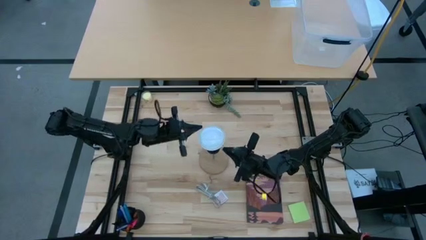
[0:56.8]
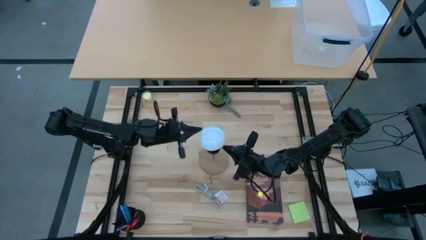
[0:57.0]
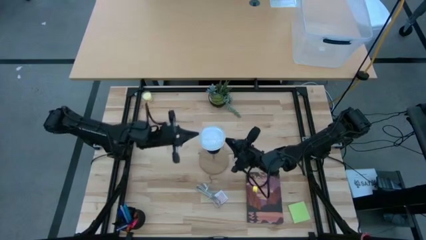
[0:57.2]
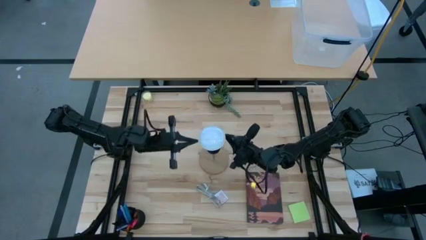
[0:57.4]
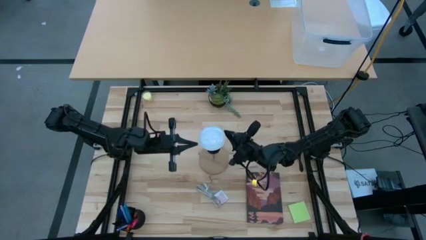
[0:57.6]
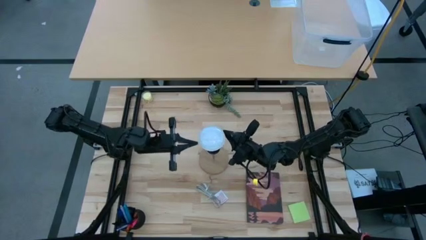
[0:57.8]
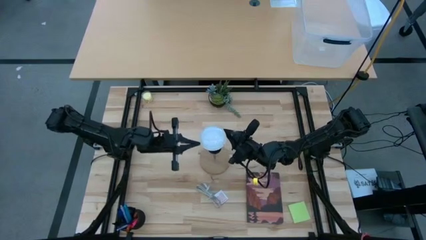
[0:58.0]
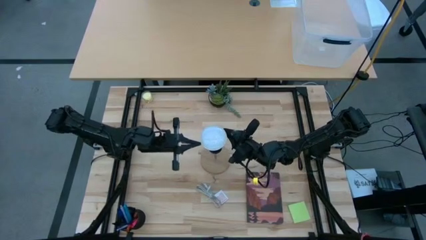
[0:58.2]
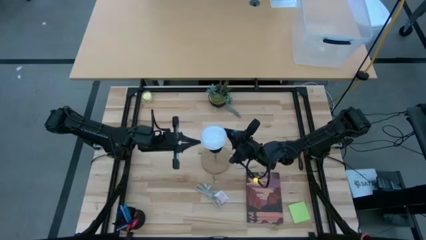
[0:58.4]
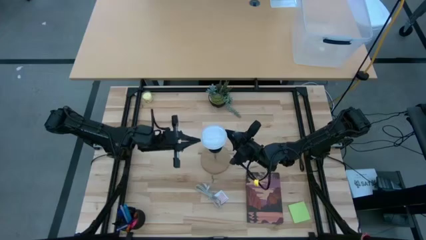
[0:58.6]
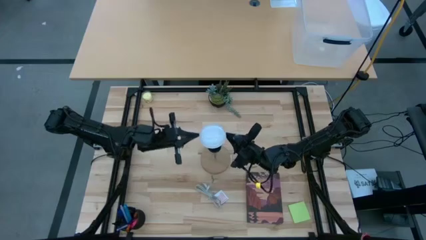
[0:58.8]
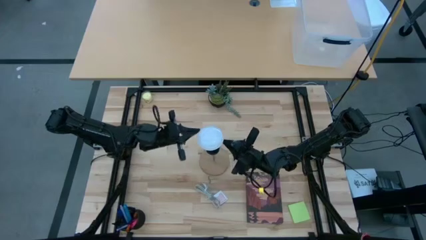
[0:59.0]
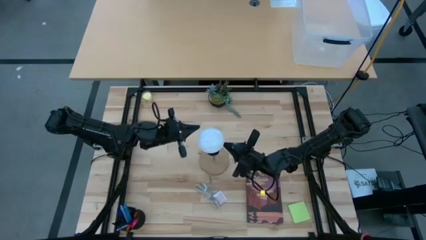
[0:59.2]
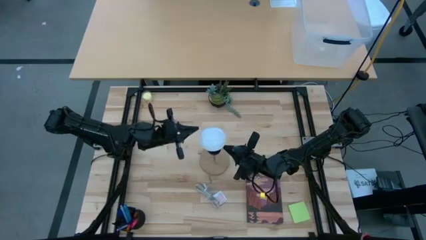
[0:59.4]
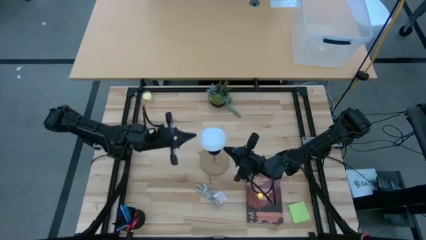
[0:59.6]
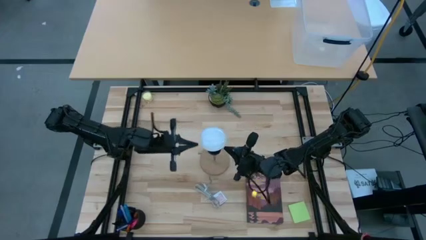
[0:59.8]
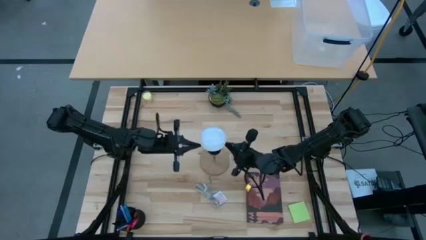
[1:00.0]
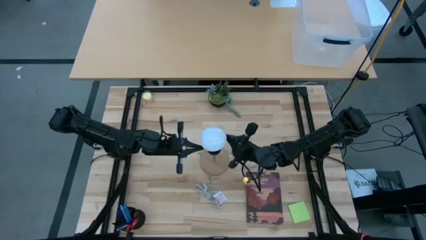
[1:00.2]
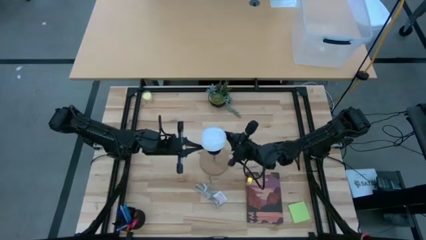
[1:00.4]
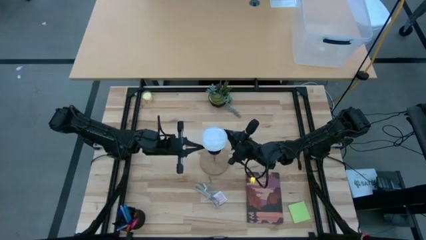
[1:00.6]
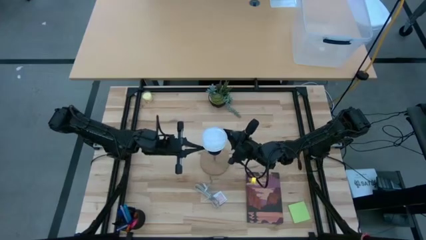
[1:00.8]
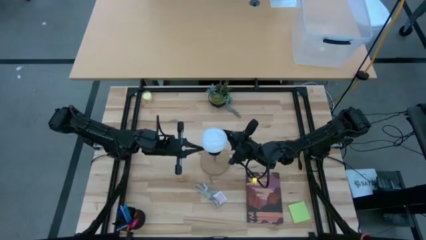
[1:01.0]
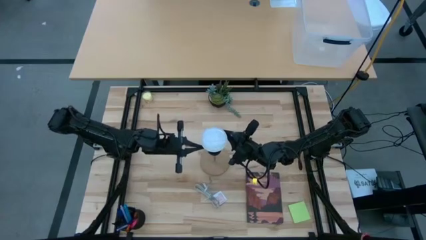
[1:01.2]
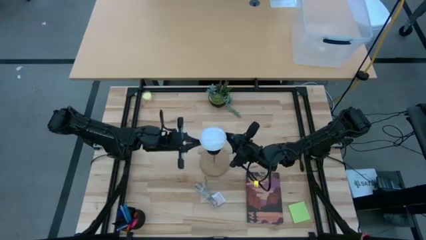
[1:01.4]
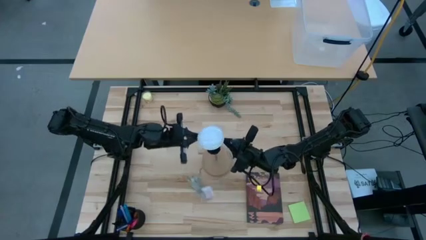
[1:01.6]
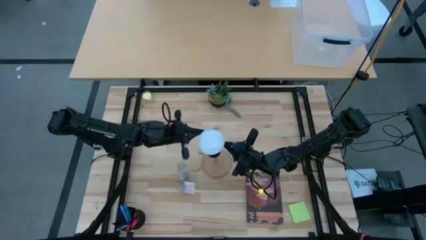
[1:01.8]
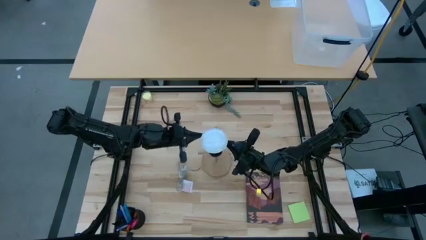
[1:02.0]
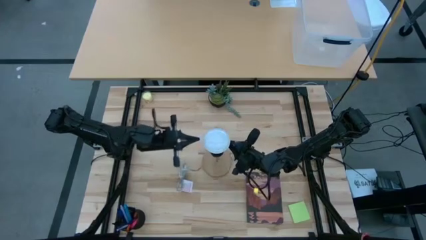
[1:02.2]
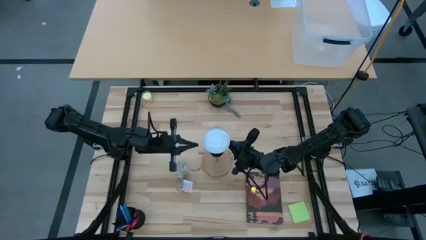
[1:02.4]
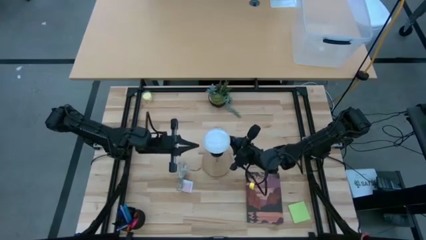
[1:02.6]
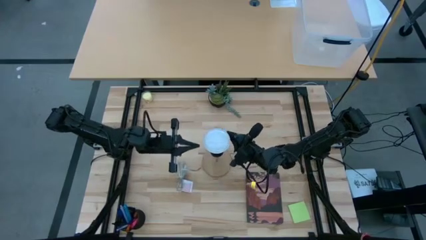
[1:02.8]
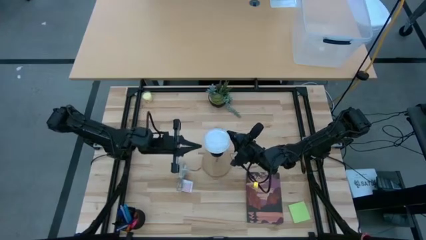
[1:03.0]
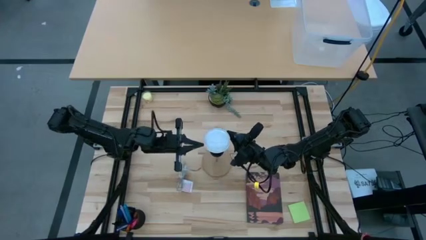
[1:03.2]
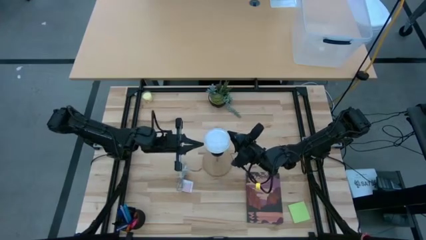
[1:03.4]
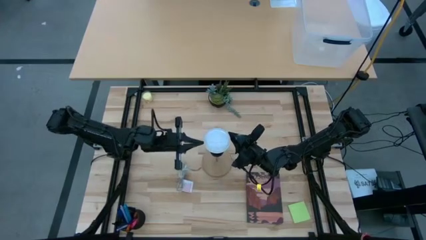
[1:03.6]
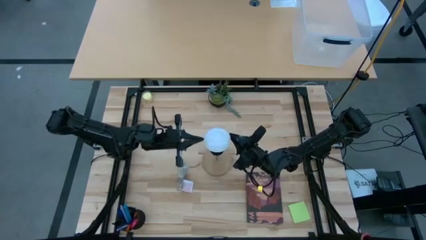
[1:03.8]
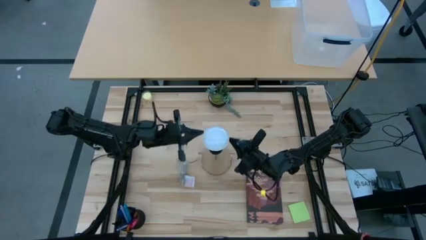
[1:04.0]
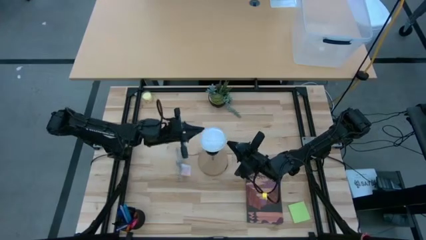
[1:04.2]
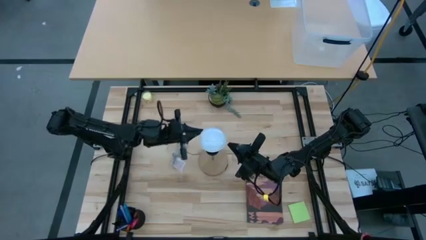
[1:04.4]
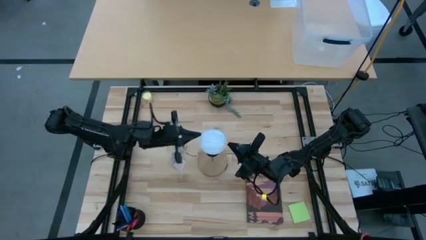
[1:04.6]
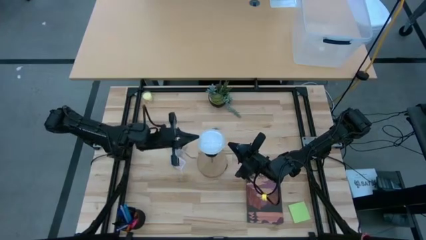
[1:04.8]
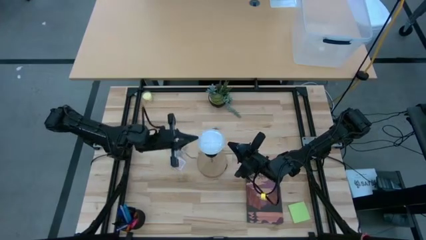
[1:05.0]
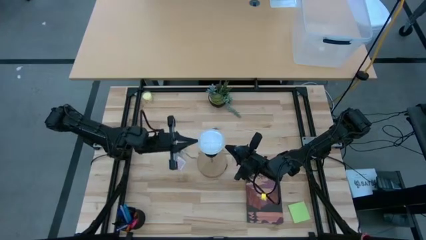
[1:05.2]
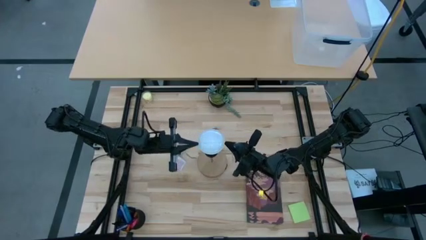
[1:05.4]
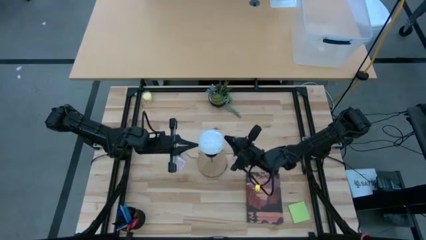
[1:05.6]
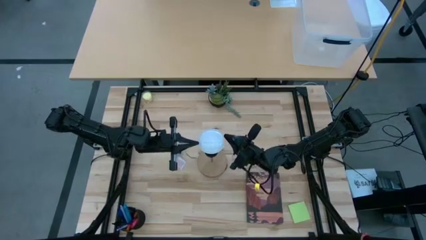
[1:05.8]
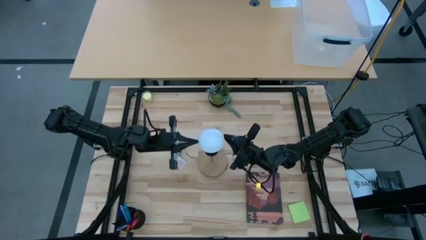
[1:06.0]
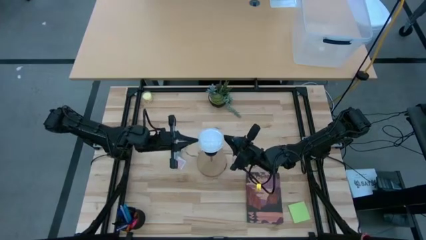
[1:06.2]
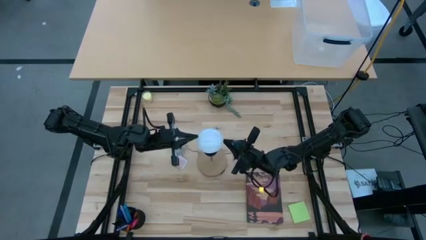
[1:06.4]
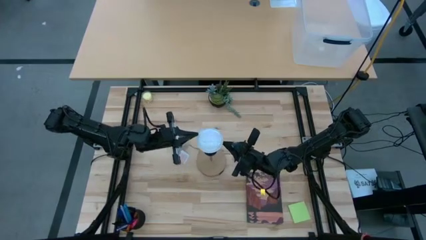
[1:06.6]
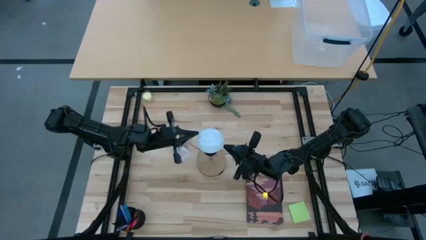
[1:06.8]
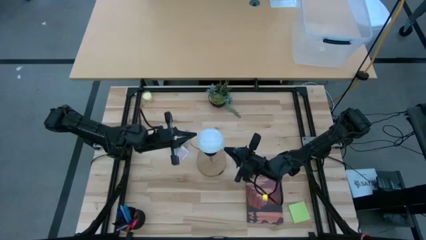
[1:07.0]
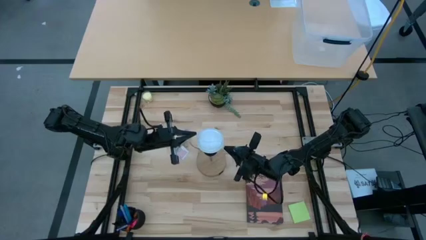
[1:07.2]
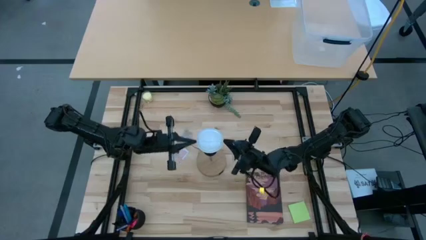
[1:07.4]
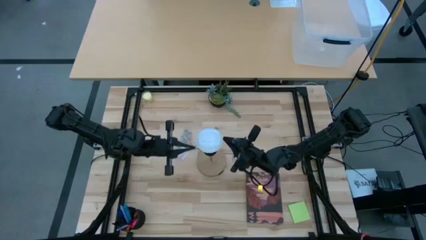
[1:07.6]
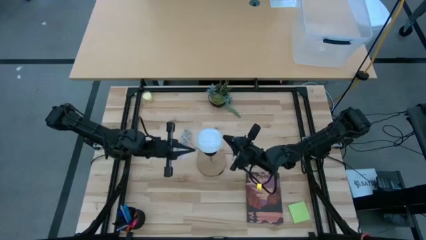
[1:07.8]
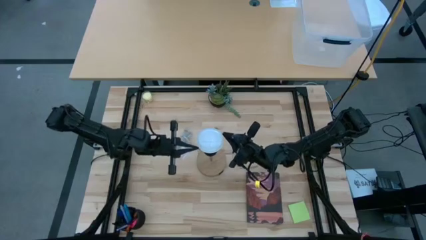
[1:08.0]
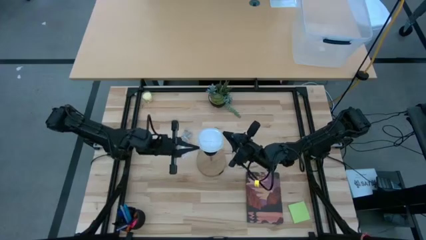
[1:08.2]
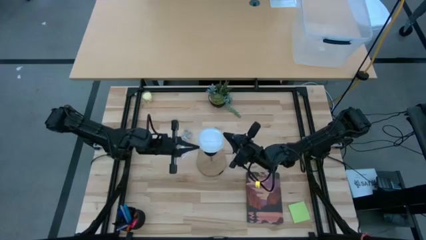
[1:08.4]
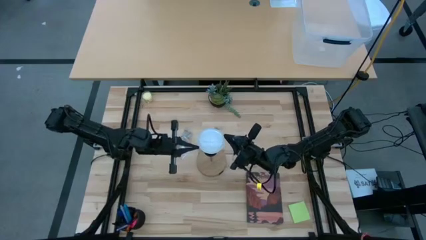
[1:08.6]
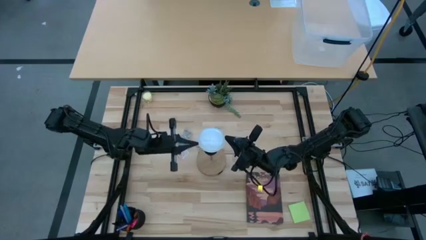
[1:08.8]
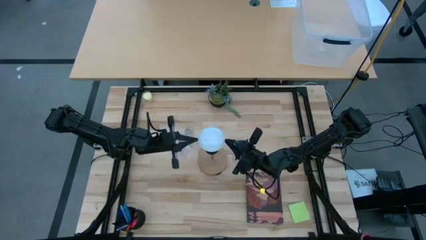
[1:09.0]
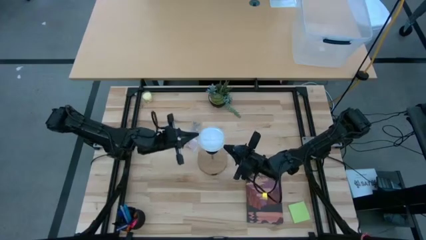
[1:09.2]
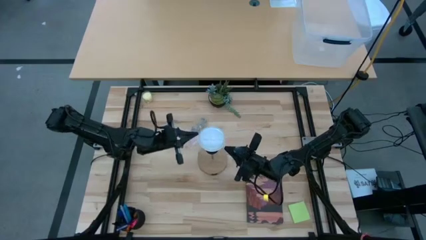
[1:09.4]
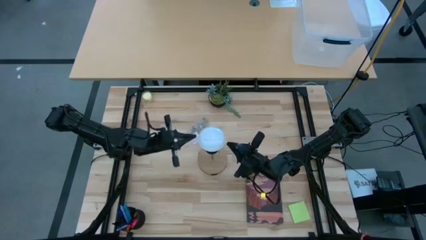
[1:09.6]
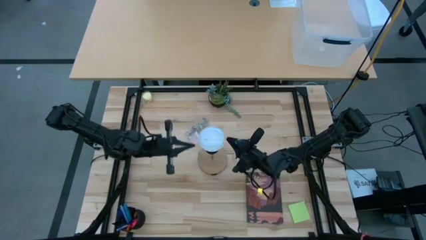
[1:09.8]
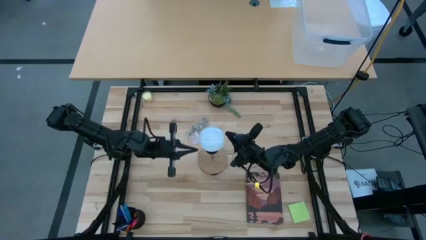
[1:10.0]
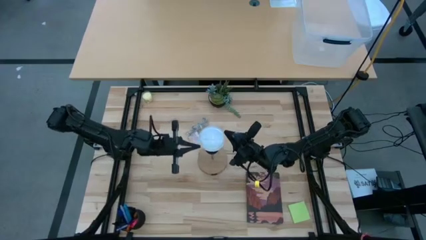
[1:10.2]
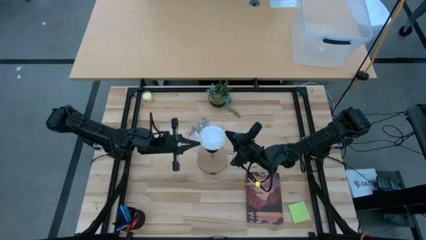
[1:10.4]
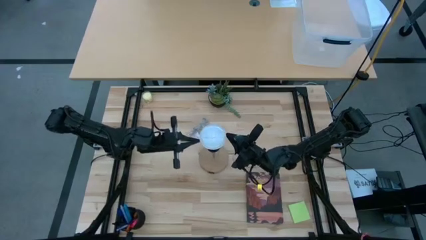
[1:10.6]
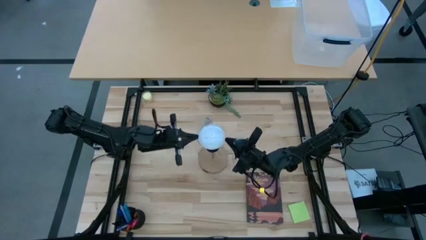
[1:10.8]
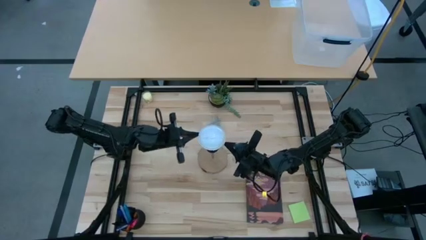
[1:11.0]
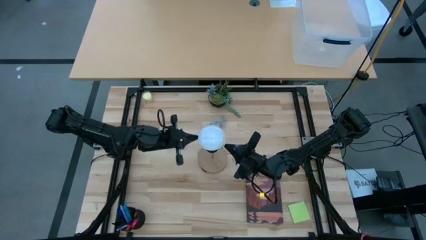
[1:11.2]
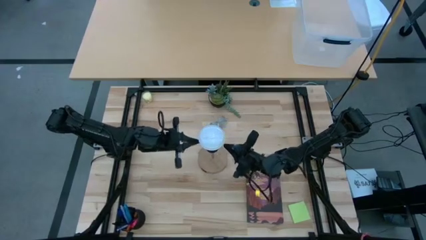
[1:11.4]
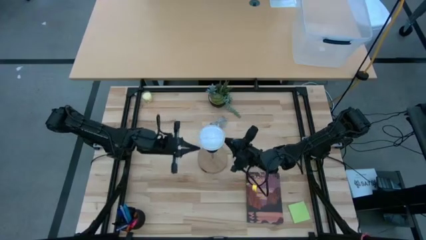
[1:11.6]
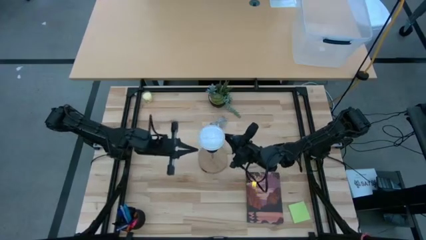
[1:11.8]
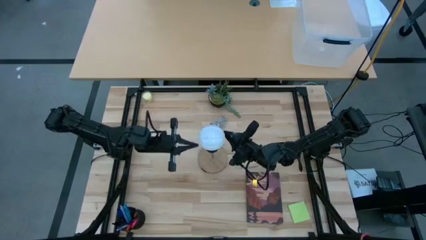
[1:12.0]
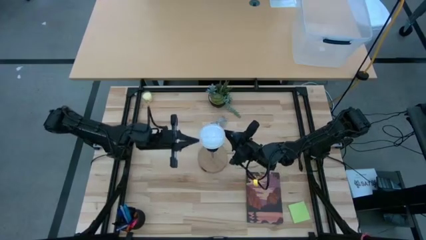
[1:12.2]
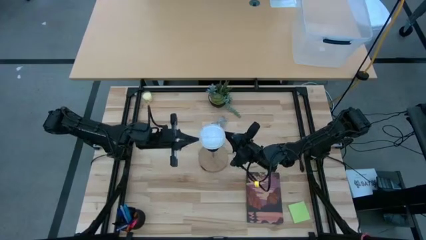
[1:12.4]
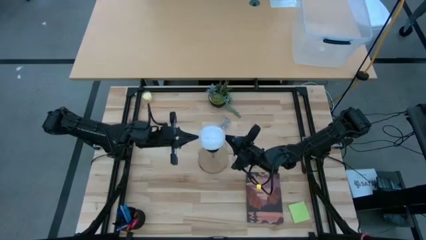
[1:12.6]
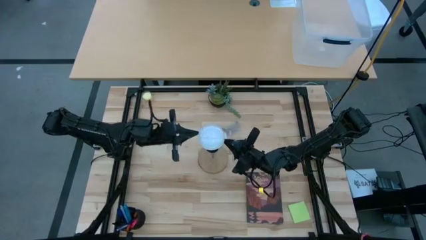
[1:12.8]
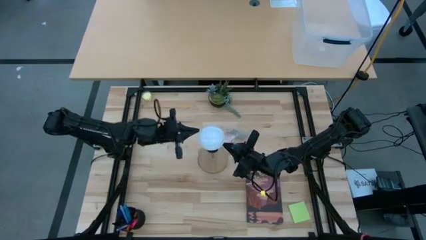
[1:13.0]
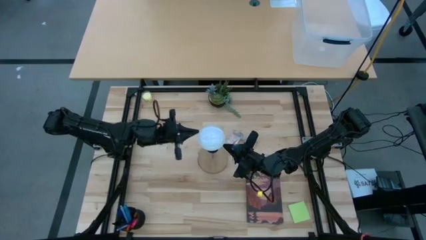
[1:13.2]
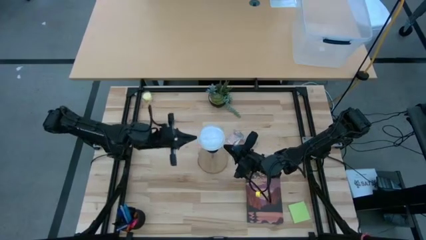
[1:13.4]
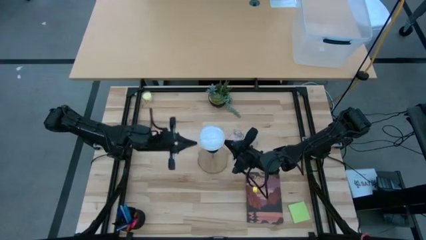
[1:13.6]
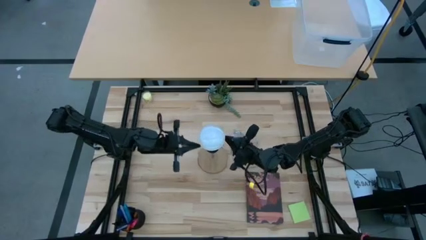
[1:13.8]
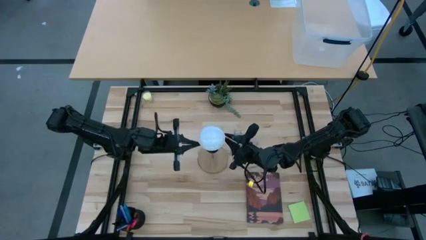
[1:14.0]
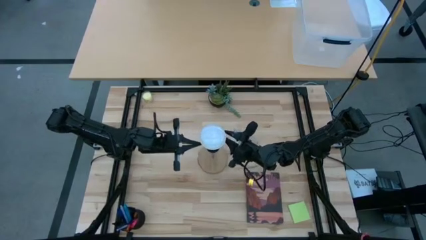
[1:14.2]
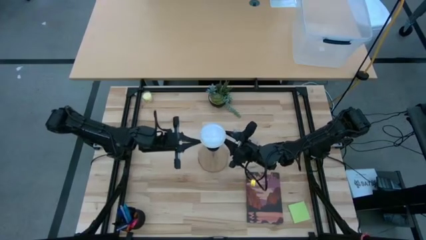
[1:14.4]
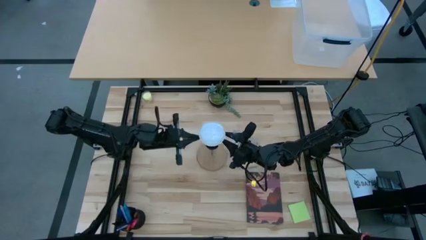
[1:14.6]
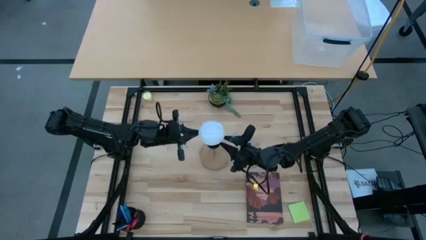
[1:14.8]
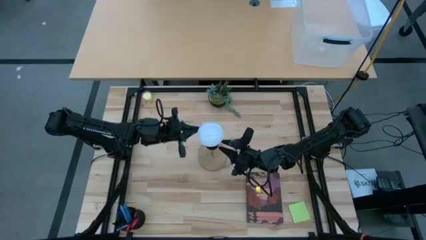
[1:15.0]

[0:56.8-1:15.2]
Task: Screw lightbulb
Insert the white lightbulb into the silver lamp
